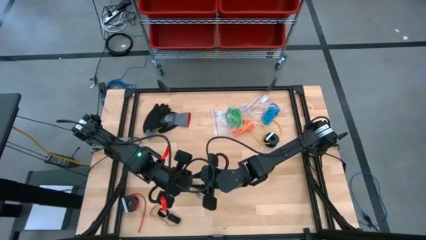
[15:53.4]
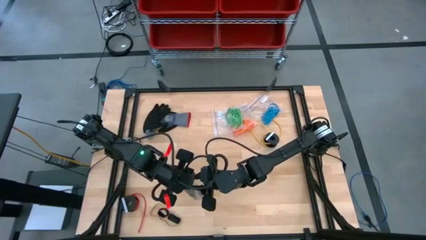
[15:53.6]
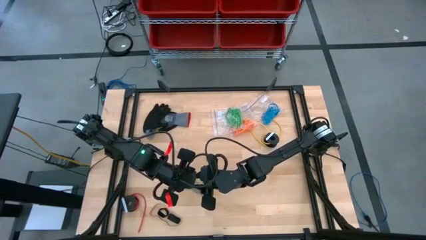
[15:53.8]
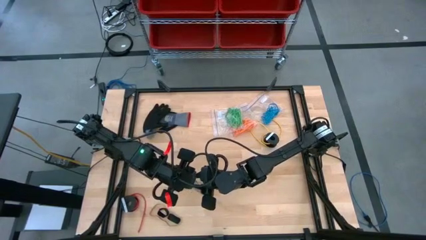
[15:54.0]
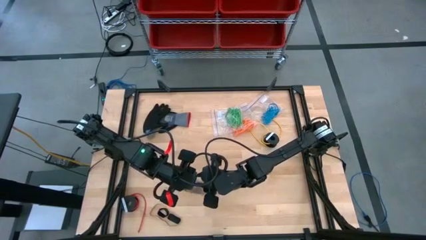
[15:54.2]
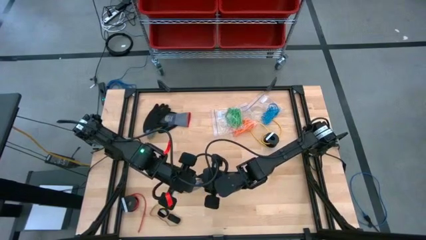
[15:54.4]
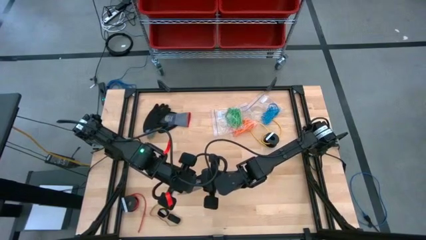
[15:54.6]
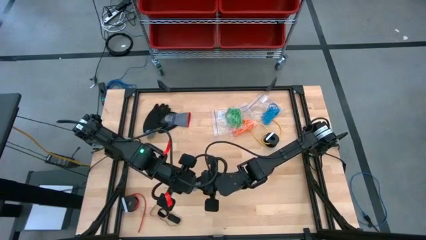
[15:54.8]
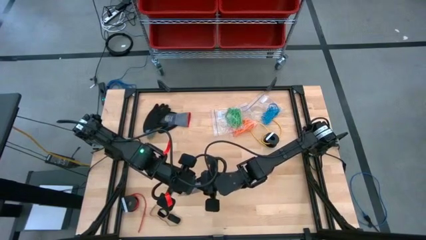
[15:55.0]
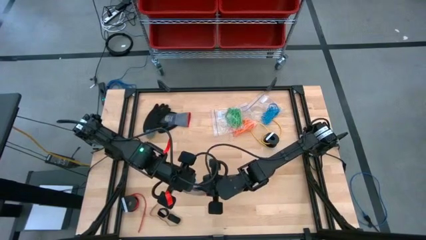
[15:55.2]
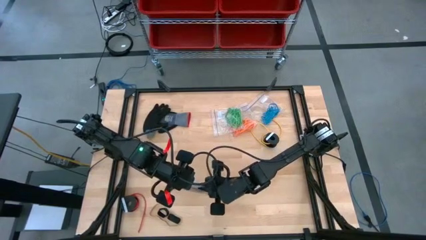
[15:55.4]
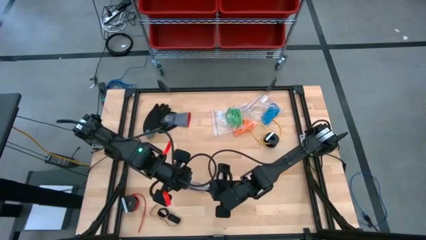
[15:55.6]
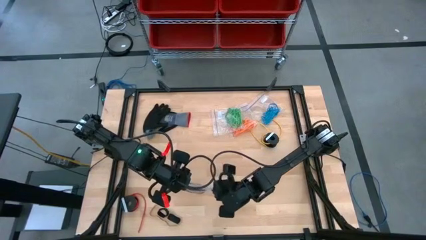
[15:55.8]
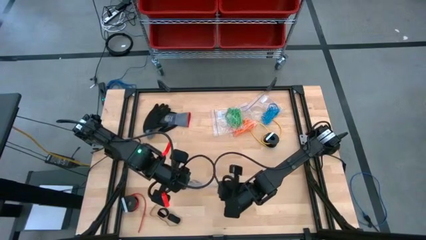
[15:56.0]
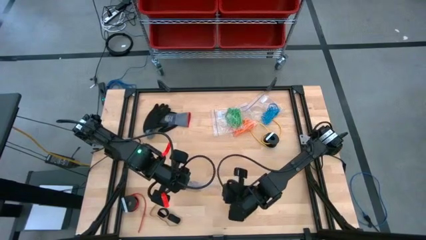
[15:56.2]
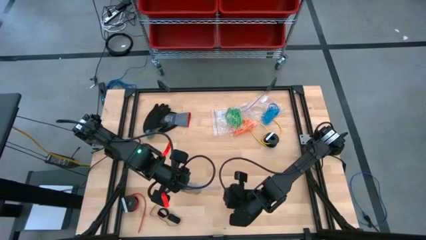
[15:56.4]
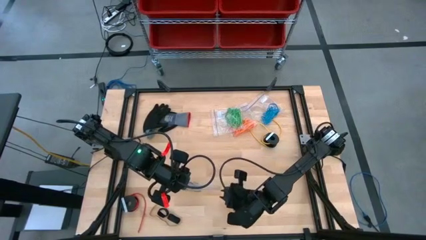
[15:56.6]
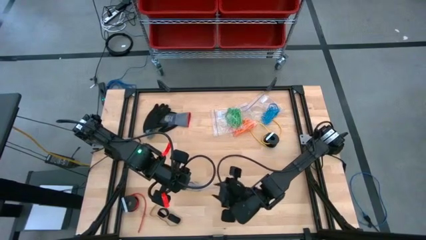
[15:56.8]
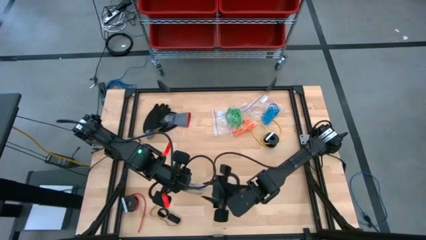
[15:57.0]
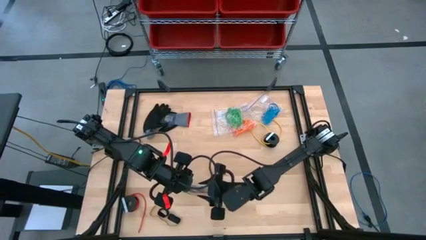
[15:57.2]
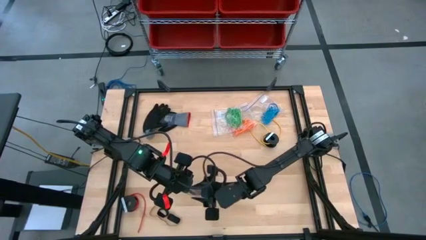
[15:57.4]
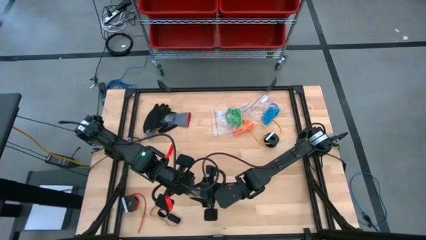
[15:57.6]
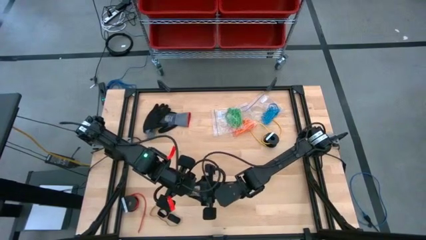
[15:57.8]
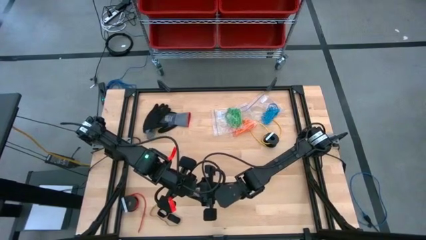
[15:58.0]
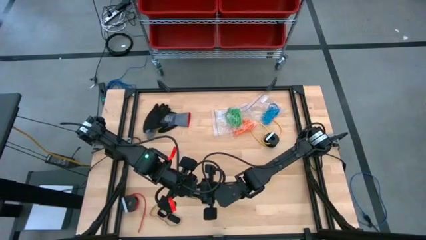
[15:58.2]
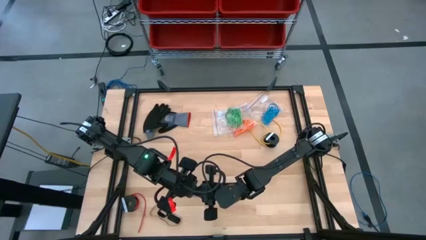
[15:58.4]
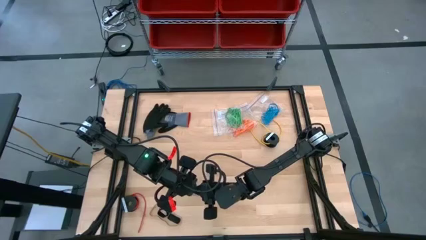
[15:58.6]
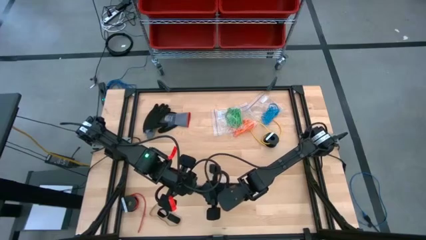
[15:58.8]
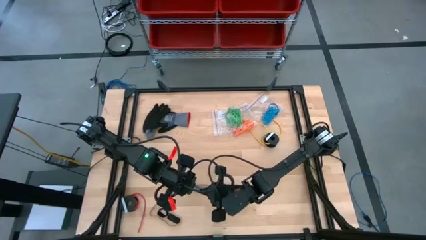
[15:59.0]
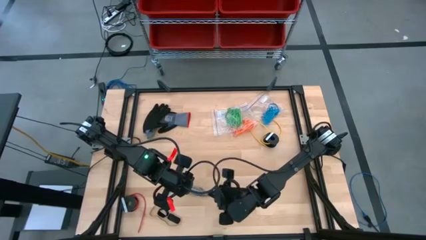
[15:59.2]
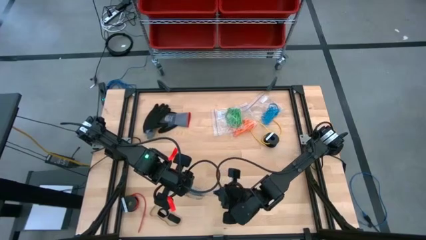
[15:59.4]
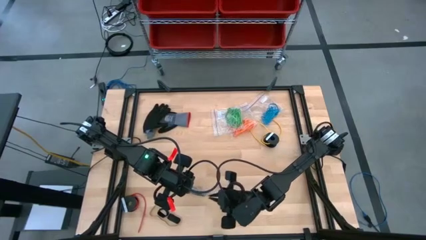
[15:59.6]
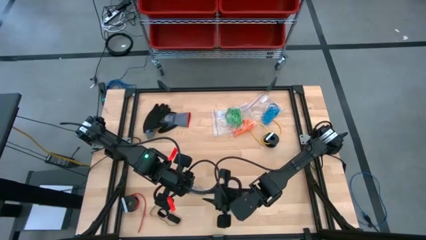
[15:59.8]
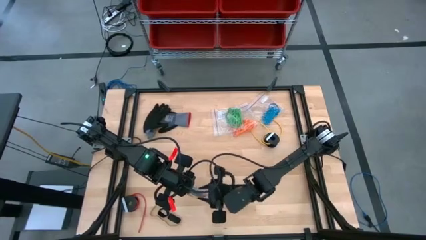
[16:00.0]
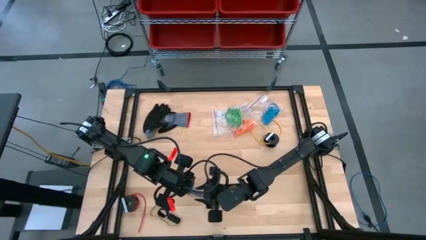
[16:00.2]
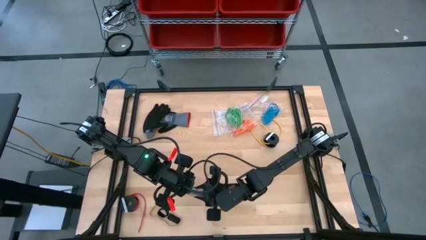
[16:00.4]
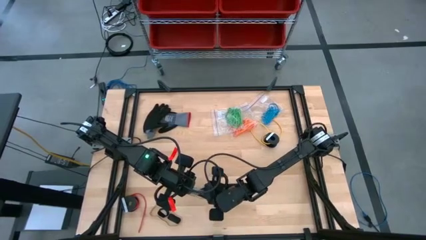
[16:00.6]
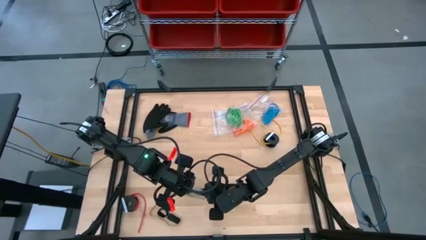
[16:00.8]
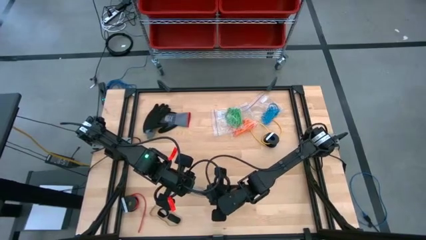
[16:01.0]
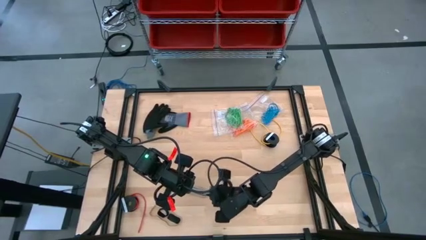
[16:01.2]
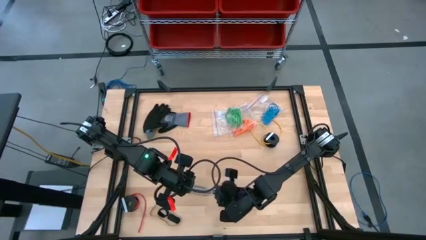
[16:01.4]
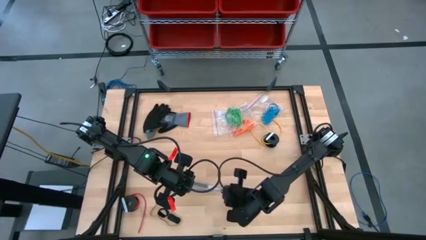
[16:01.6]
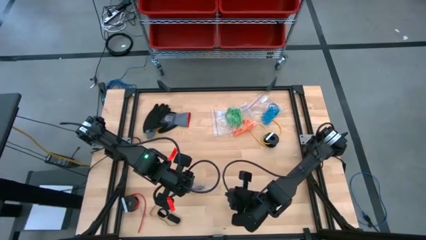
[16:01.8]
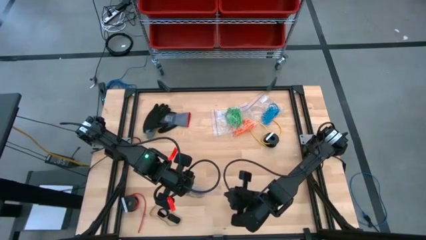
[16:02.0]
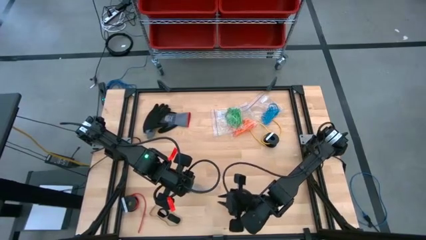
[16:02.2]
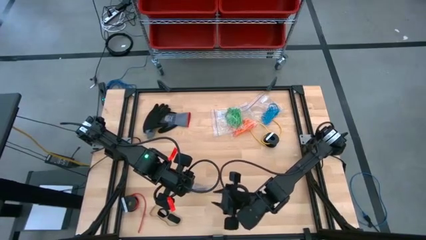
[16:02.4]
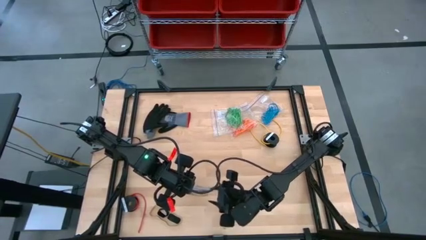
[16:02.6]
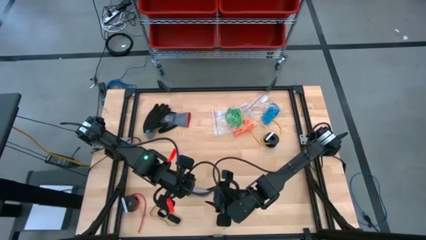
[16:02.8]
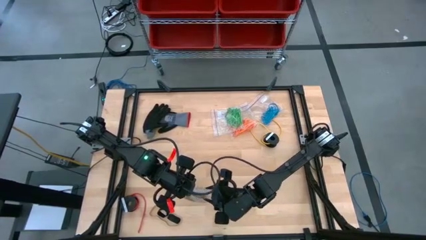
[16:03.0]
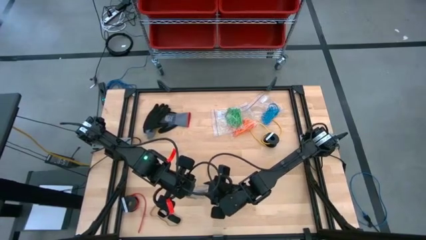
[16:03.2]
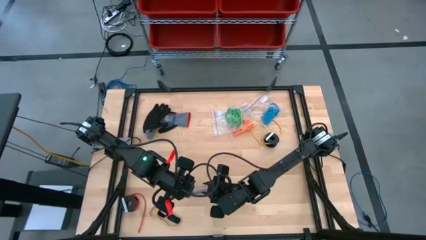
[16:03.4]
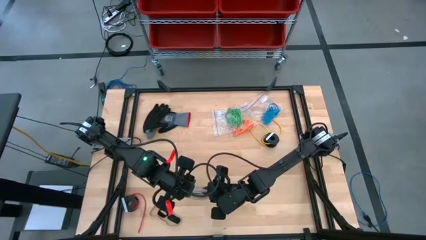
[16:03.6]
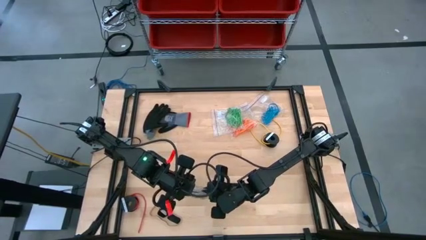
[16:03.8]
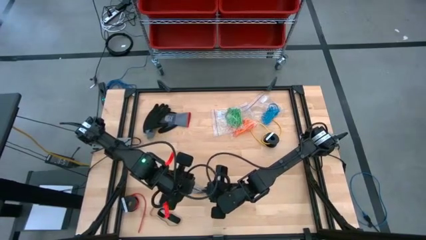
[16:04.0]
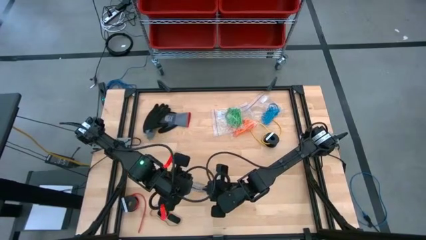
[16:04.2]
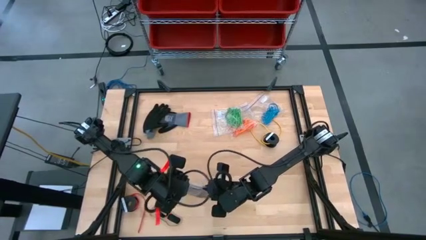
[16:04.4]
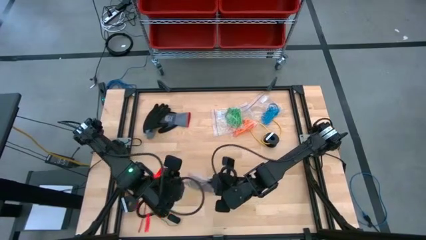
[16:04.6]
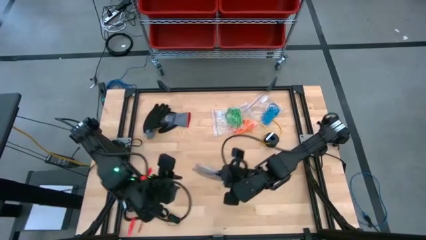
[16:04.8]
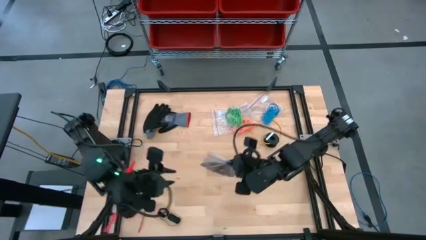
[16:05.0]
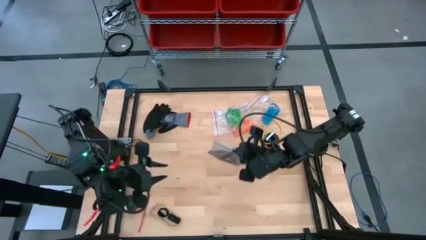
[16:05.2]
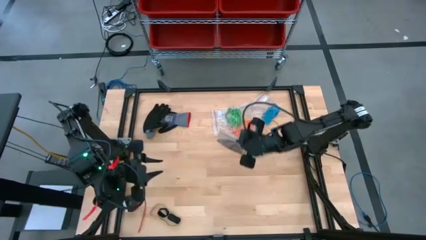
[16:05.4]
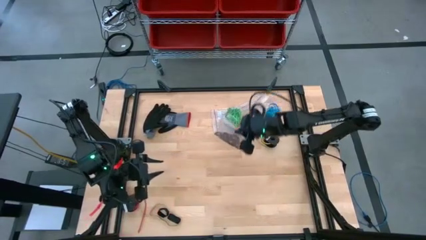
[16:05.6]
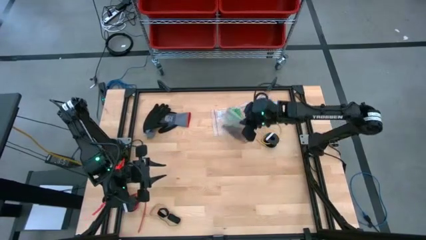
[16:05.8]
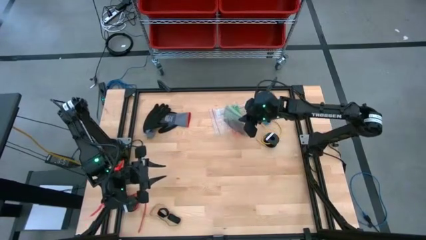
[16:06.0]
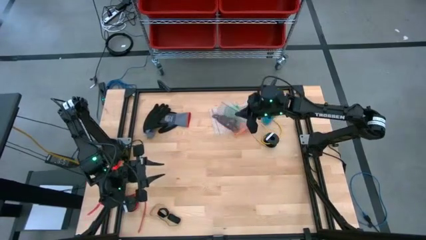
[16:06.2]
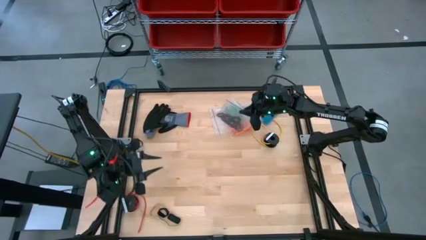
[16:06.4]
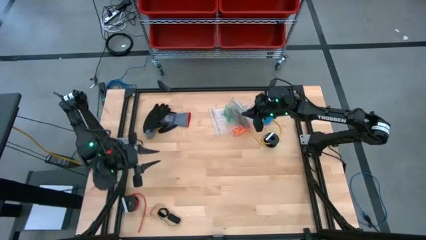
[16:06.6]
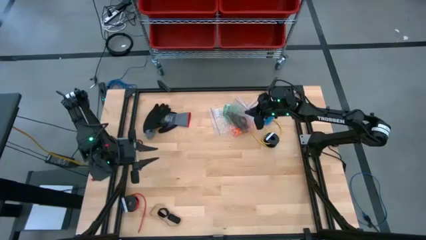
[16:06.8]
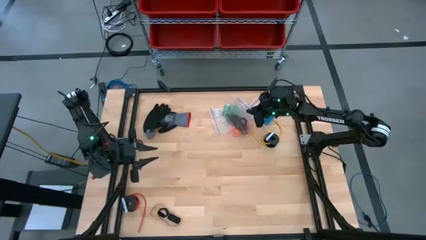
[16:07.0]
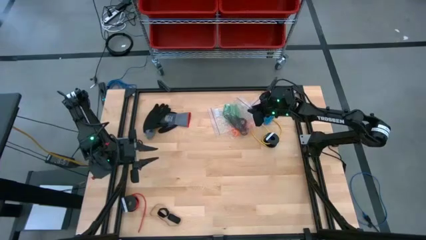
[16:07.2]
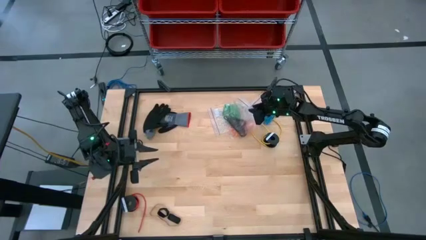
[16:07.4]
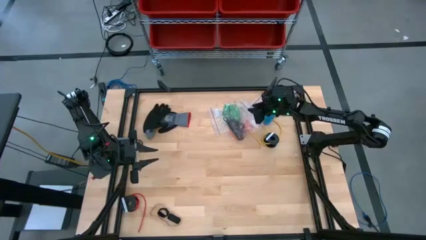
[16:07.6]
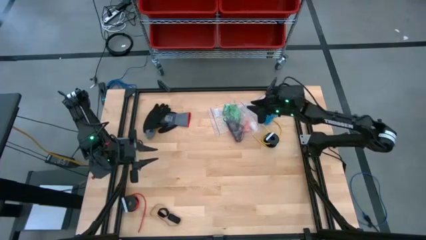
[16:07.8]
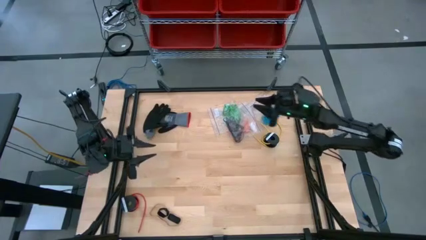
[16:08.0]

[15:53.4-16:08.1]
Task: Sort rubber bands
Close the transparent zip bag
